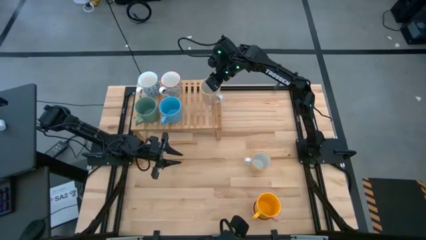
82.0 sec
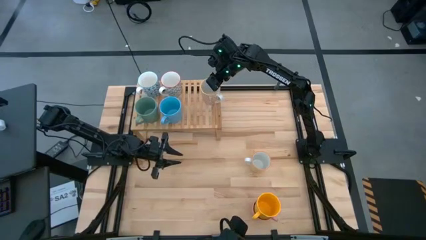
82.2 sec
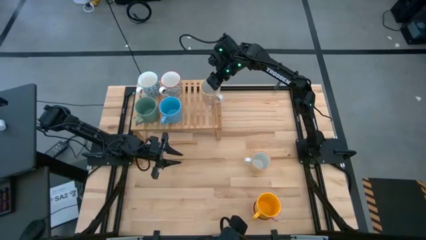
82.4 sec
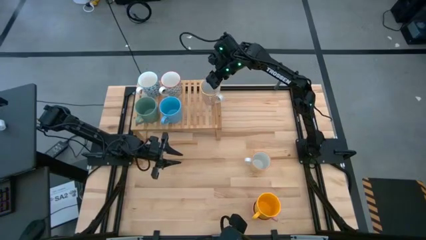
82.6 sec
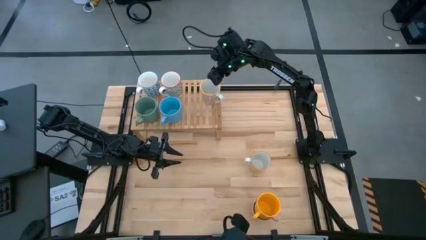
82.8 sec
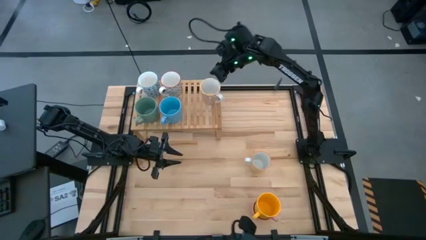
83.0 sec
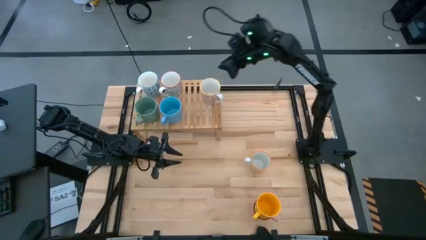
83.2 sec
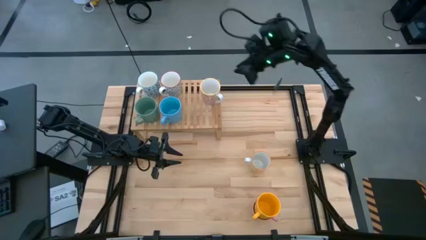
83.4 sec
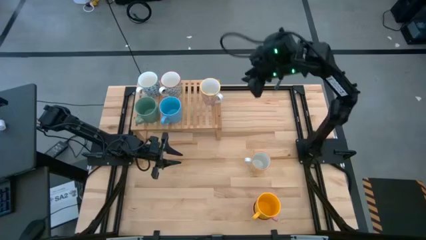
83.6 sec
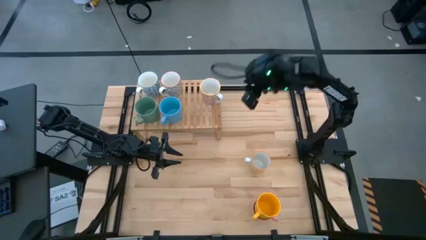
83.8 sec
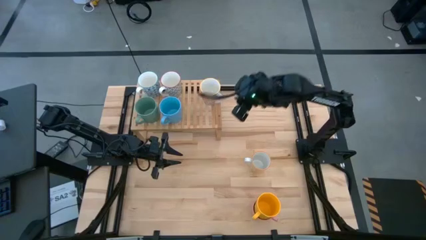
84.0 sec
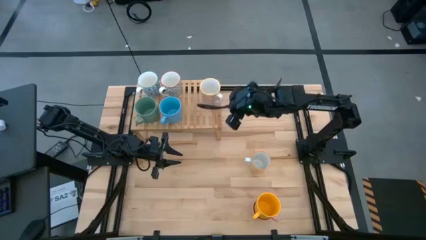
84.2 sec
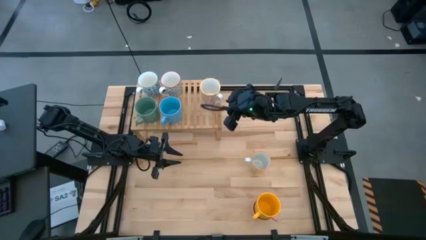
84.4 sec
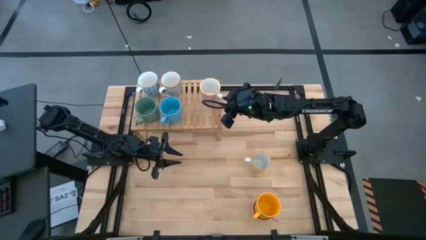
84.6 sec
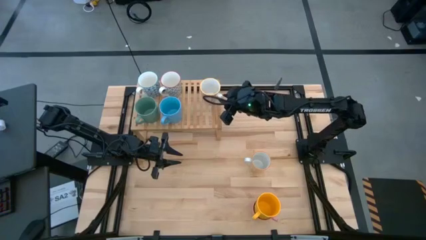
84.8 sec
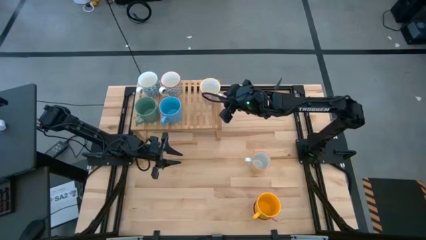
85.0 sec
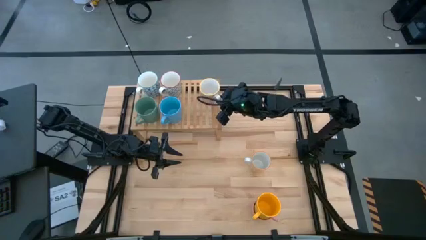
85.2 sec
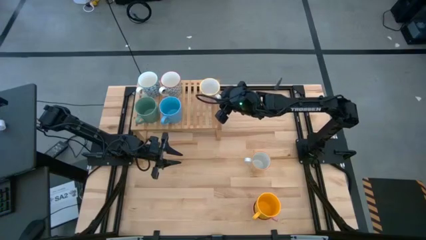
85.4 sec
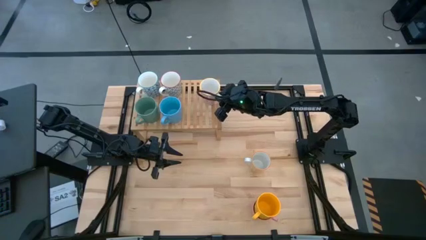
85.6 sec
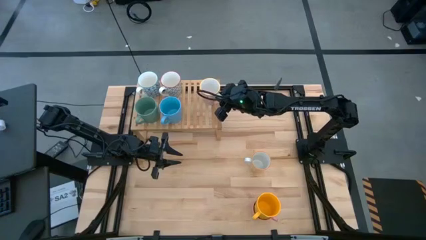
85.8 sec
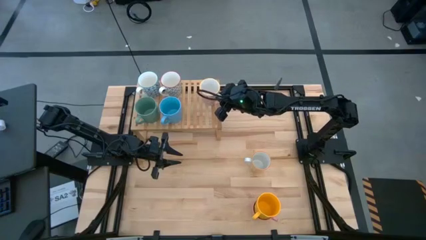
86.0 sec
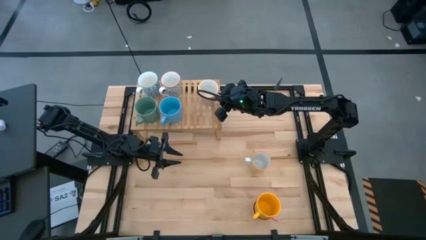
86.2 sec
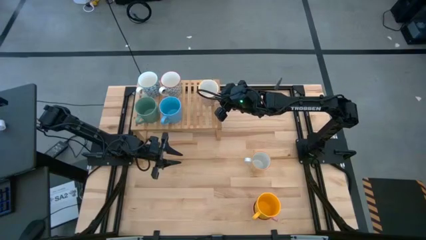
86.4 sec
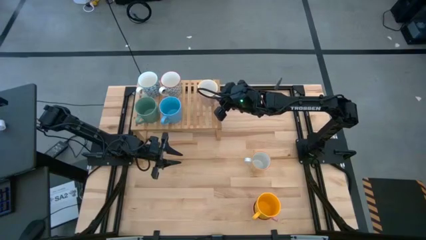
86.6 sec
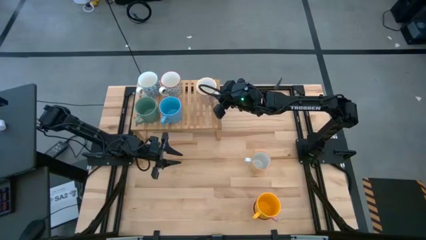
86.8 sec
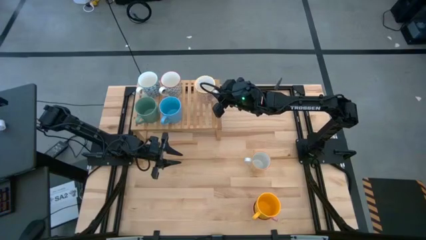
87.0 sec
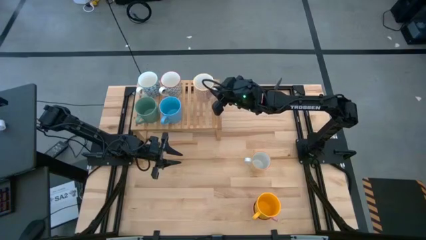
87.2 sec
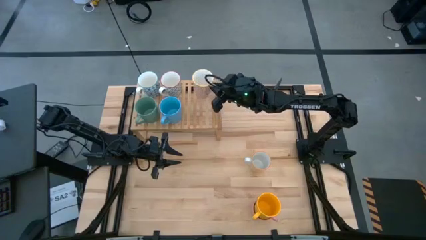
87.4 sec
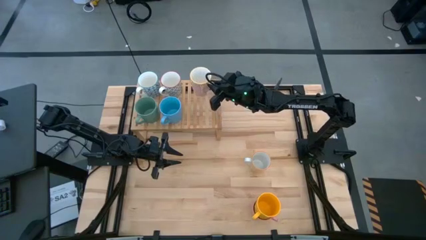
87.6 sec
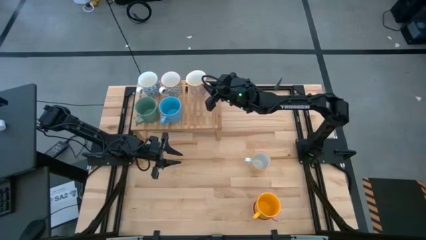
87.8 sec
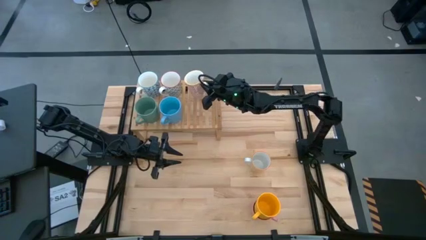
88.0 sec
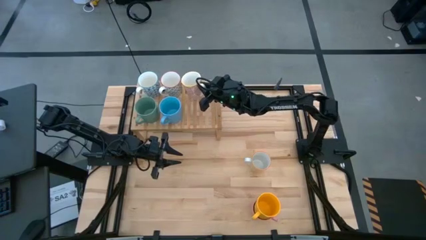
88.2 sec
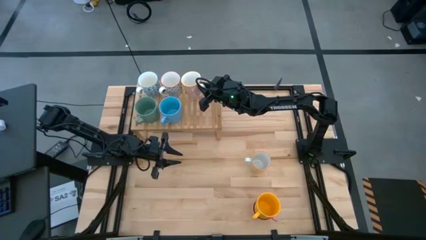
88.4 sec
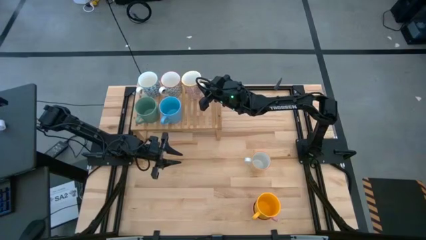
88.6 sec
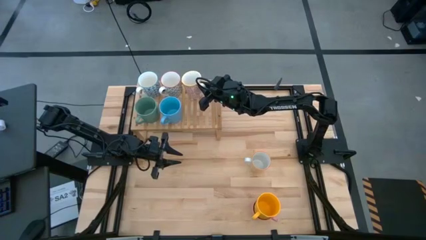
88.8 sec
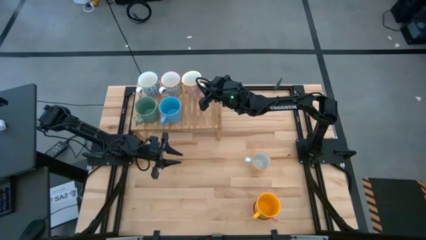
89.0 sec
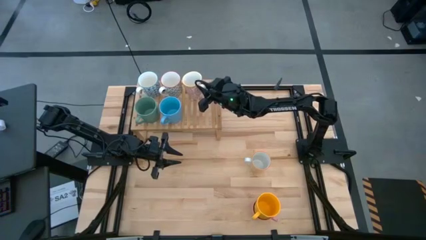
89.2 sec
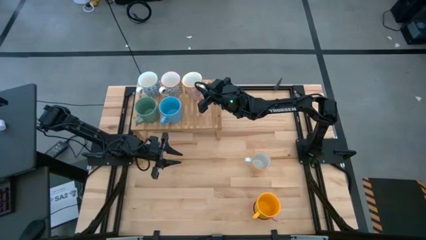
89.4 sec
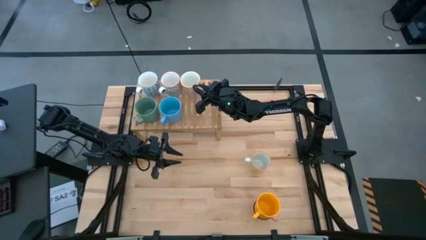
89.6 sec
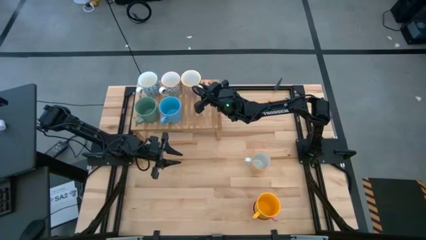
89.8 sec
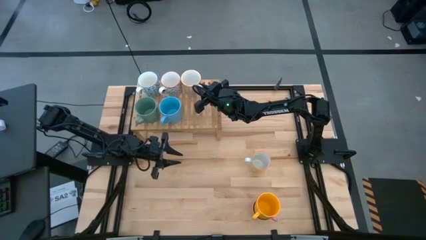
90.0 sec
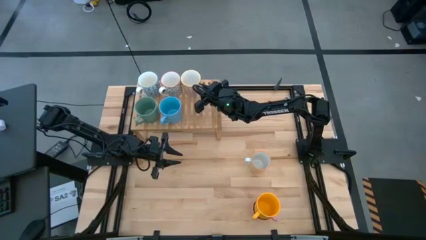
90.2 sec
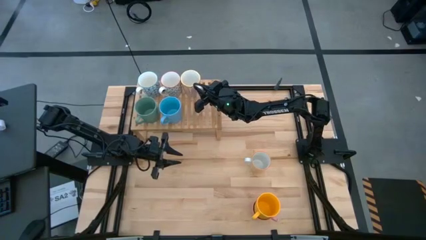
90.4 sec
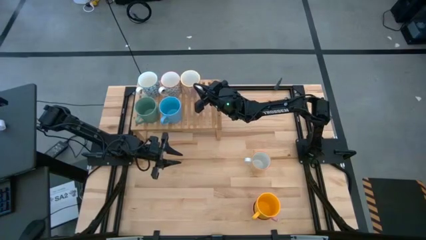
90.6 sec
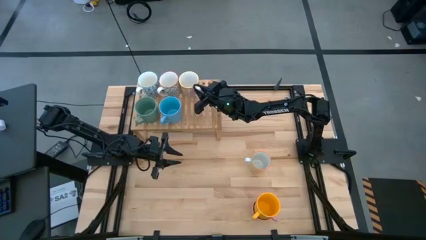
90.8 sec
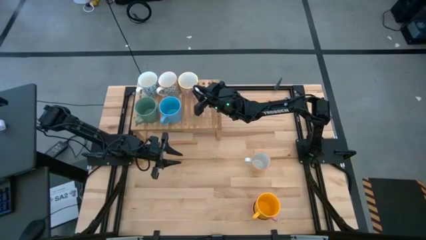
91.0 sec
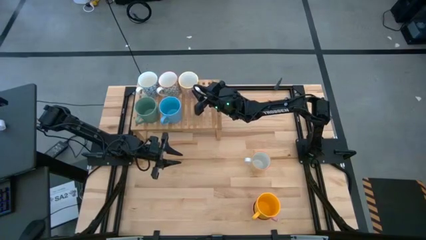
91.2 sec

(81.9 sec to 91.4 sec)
Task: Place coffee mugs
Adjust the white-orange patterned mug on the shelf

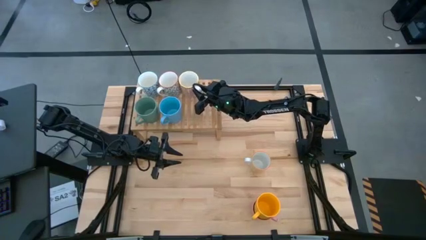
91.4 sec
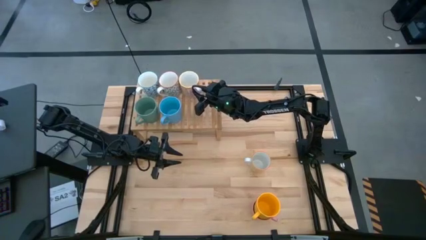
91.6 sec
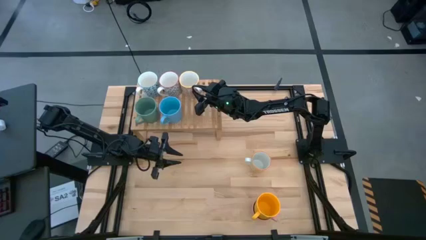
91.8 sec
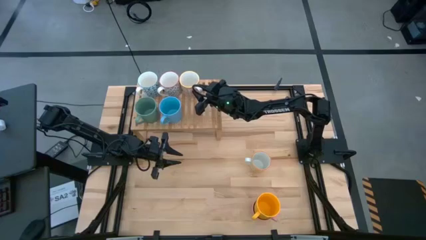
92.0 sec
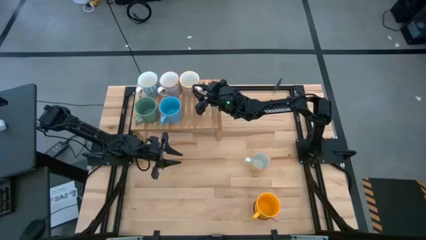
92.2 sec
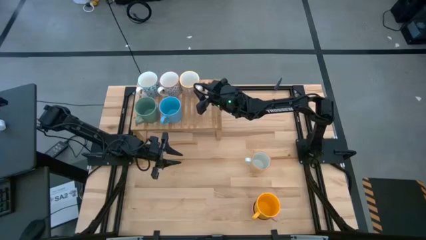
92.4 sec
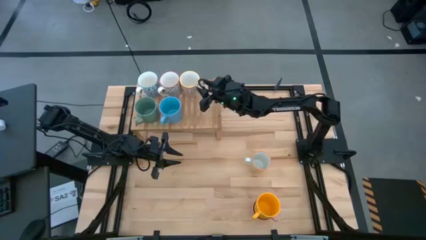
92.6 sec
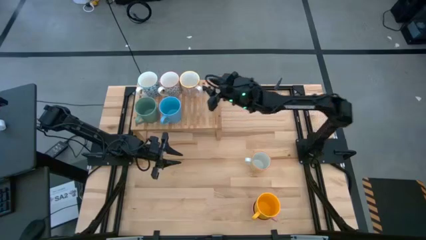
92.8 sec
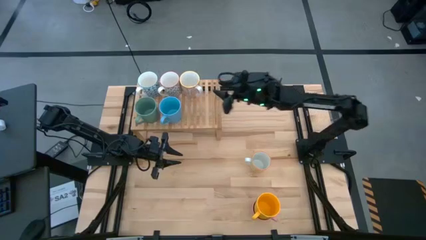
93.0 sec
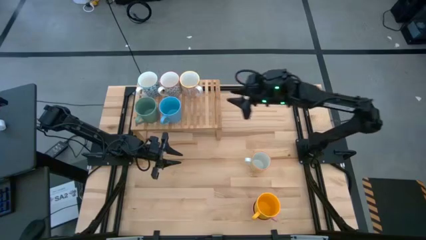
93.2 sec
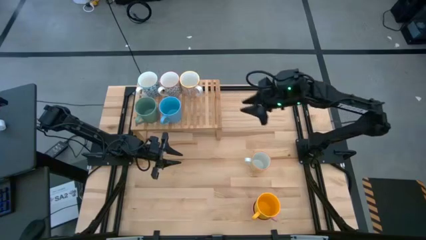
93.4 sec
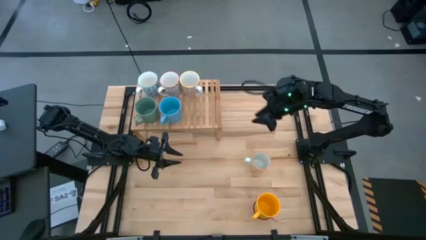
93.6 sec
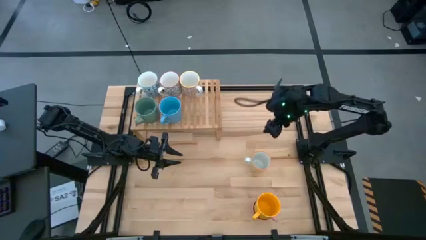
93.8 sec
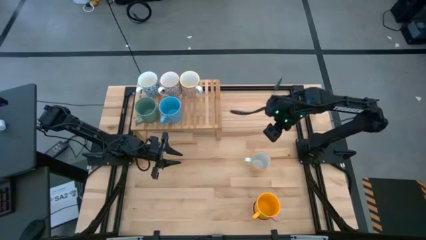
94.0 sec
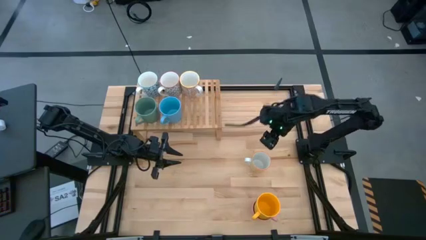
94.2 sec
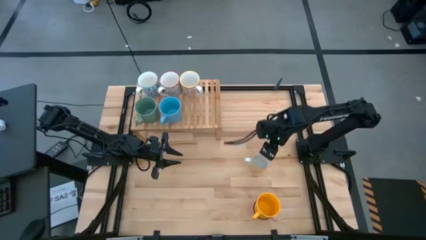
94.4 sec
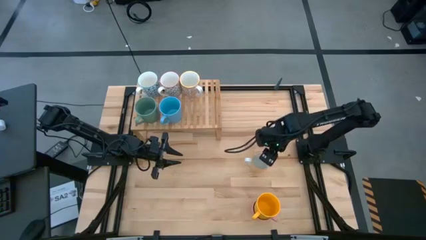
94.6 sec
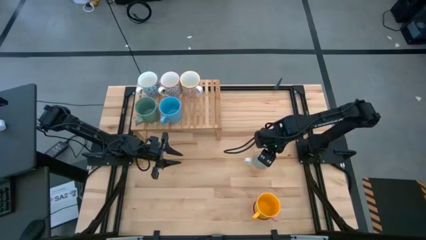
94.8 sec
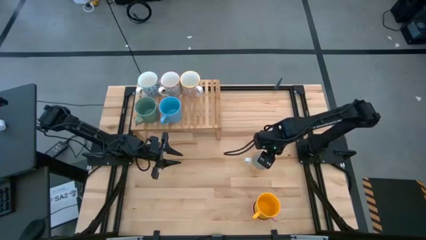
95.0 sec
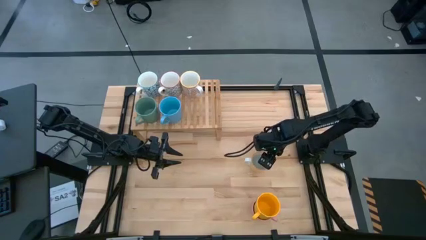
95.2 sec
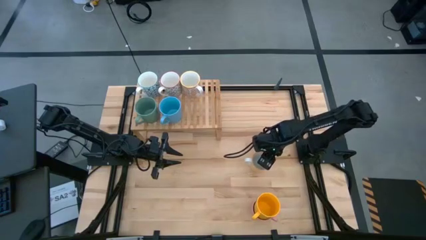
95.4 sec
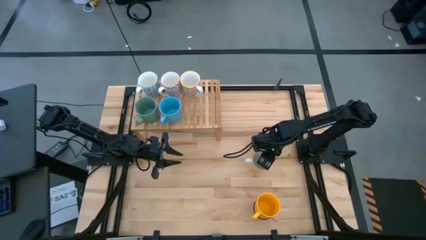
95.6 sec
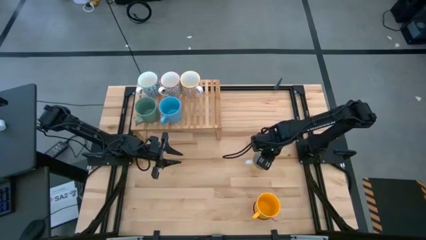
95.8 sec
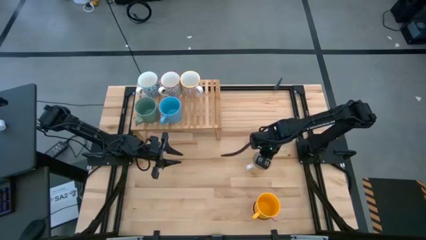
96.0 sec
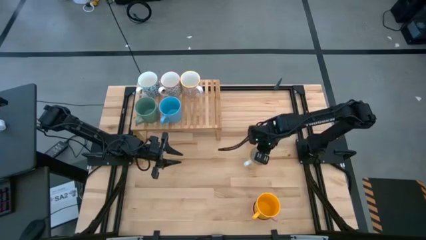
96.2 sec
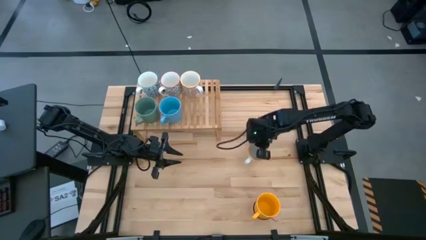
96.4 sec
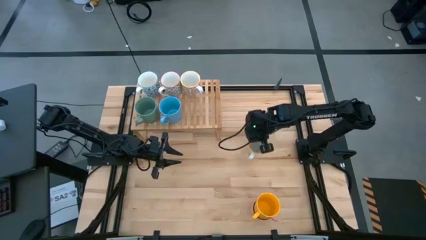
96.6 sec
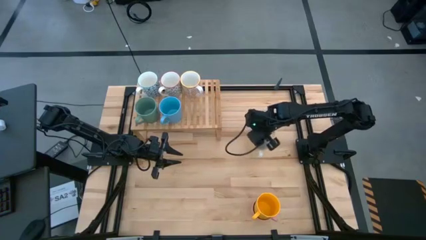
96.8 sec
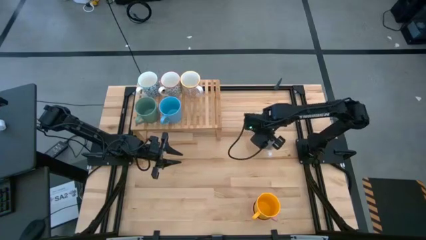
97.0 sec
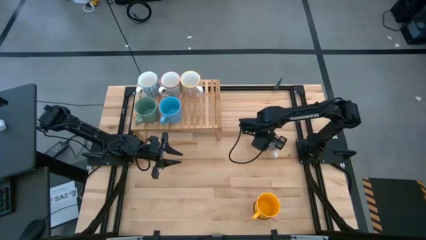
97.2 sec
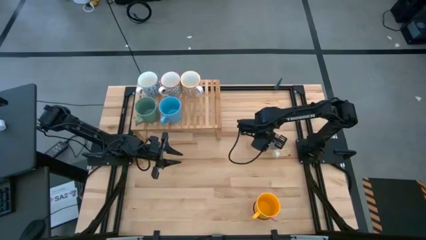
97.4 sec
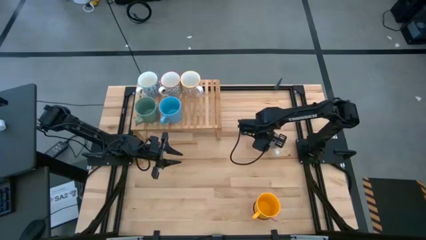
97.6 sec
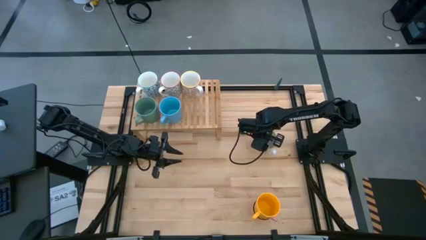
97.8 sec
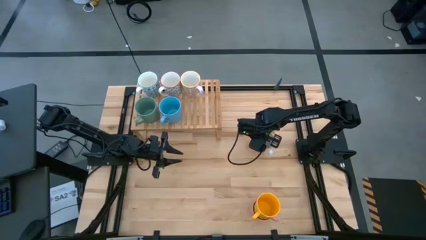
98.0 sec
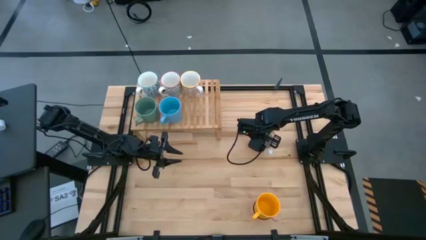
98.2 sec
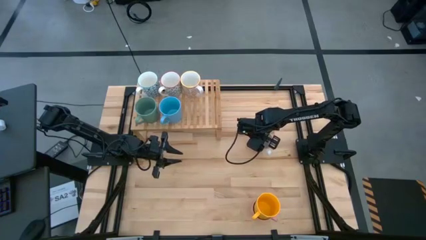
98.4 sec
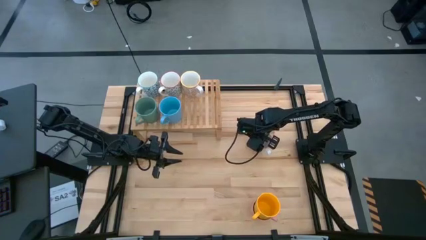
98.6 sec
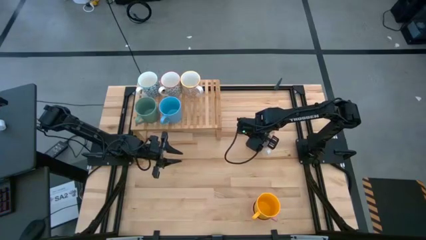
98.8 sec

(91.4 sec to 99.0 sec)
Move the white-orange patterned mug to the middle
